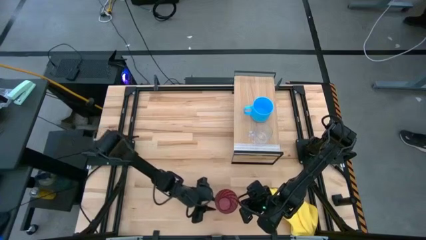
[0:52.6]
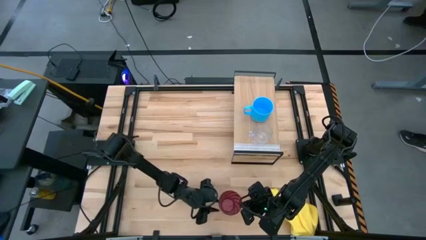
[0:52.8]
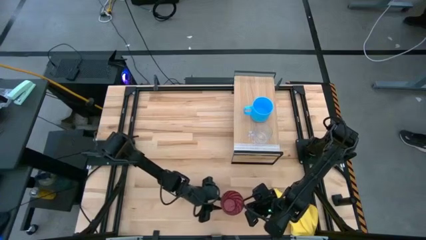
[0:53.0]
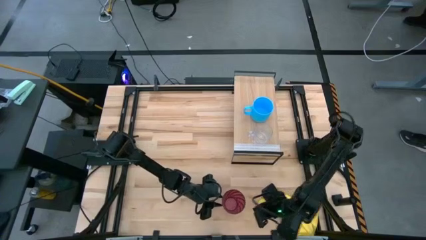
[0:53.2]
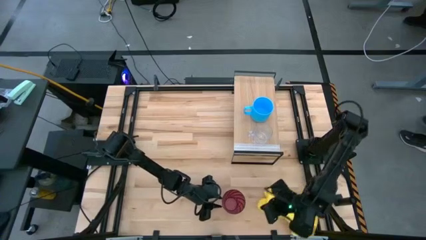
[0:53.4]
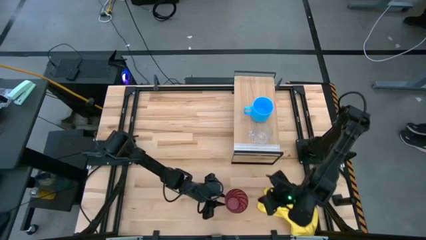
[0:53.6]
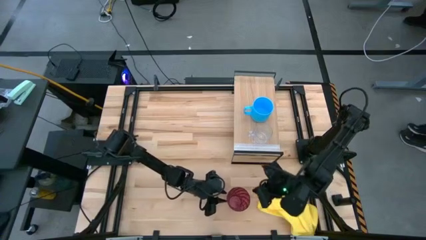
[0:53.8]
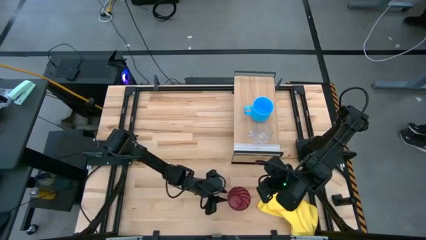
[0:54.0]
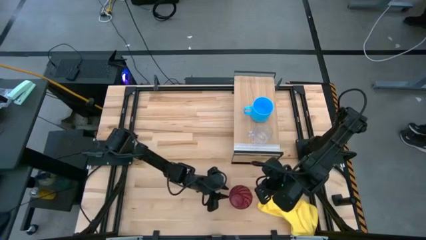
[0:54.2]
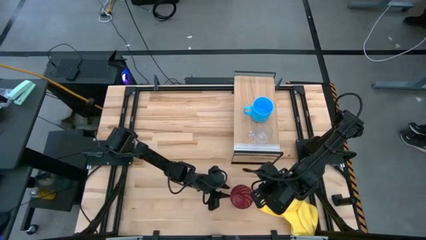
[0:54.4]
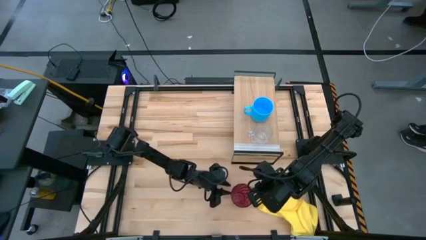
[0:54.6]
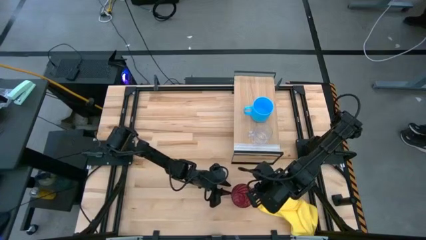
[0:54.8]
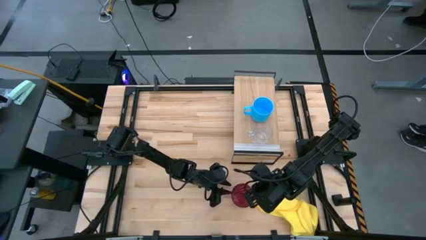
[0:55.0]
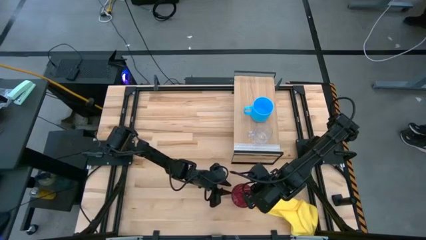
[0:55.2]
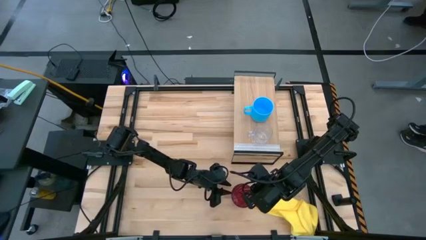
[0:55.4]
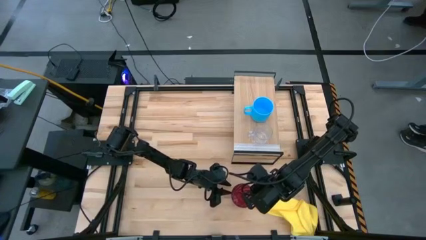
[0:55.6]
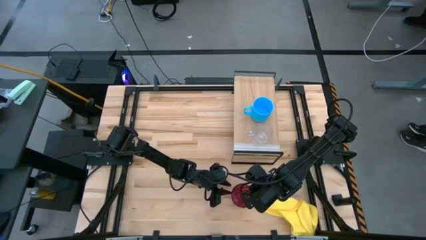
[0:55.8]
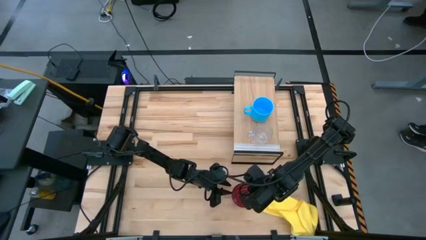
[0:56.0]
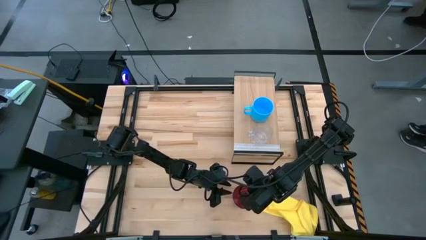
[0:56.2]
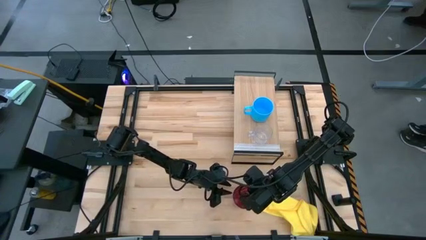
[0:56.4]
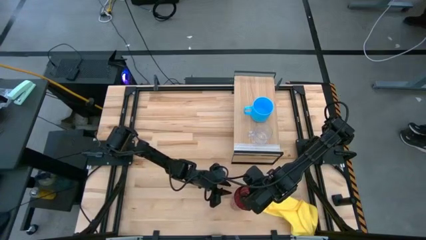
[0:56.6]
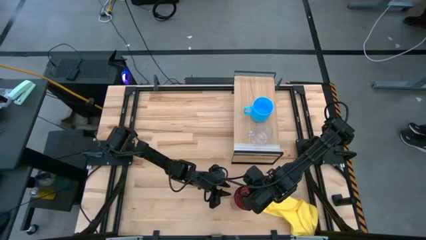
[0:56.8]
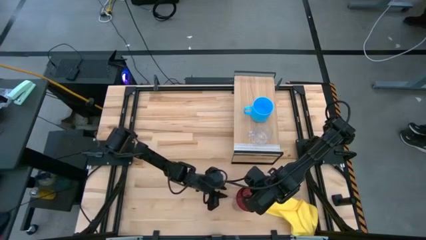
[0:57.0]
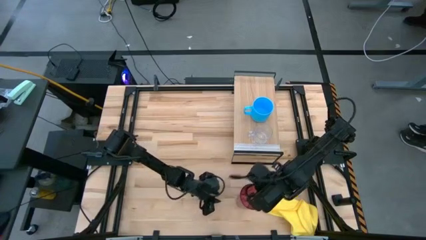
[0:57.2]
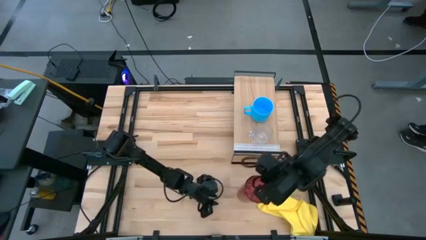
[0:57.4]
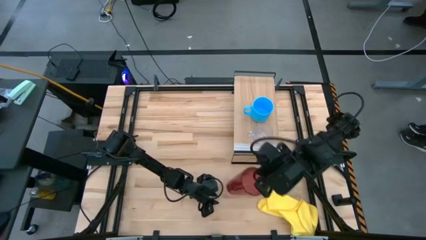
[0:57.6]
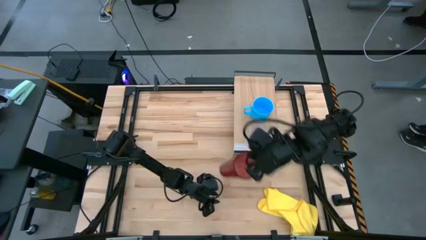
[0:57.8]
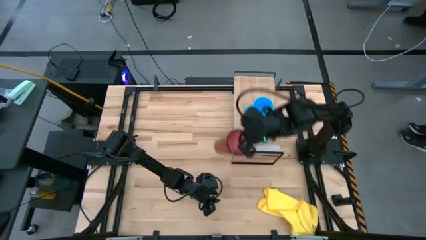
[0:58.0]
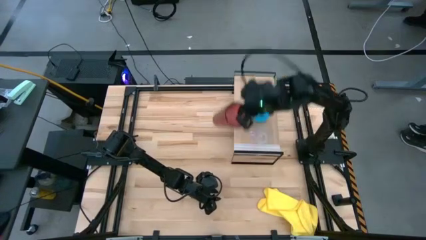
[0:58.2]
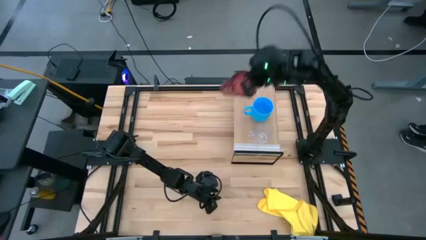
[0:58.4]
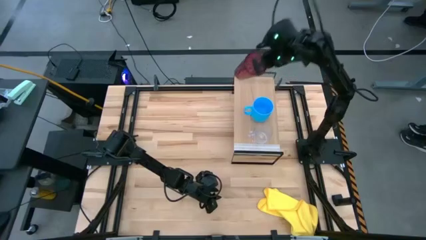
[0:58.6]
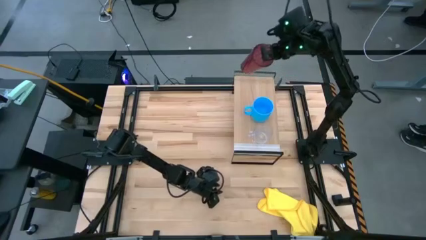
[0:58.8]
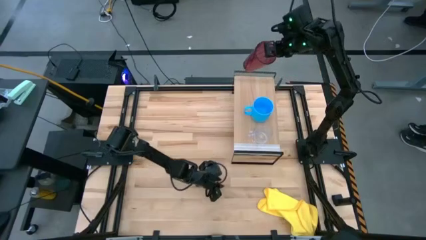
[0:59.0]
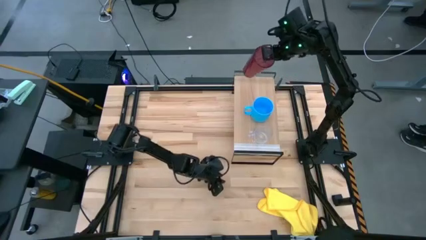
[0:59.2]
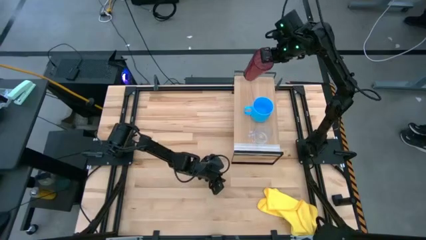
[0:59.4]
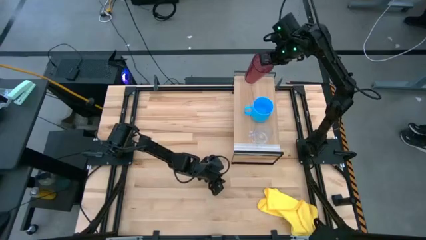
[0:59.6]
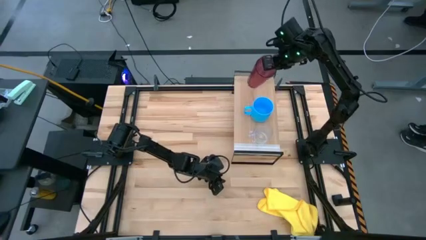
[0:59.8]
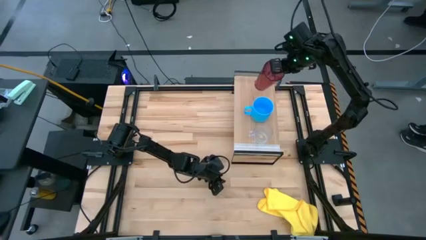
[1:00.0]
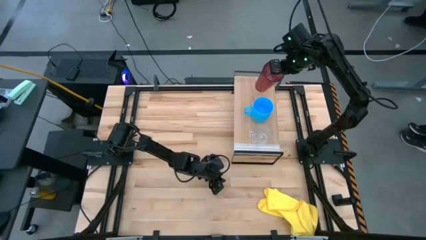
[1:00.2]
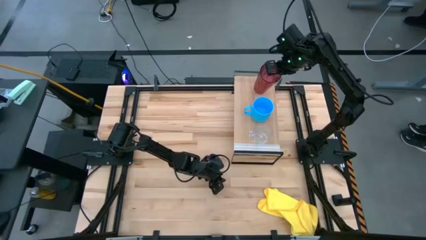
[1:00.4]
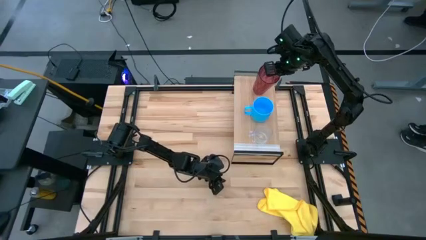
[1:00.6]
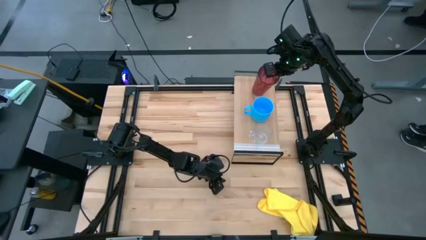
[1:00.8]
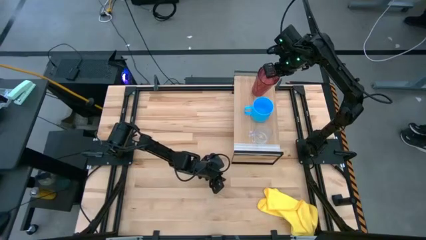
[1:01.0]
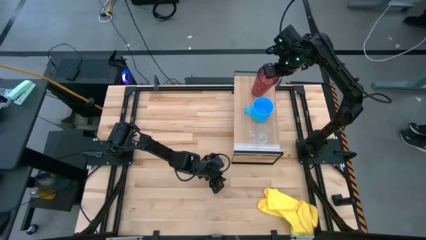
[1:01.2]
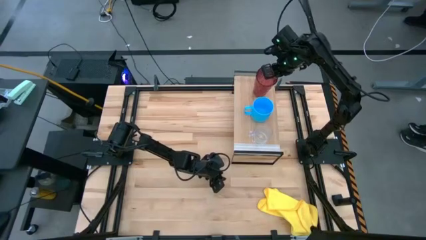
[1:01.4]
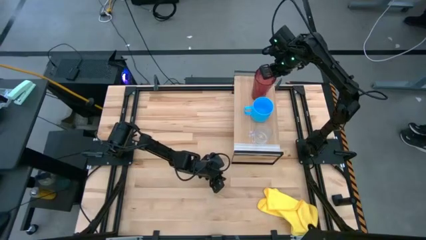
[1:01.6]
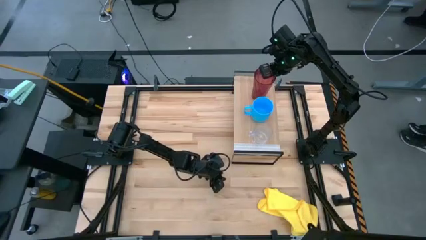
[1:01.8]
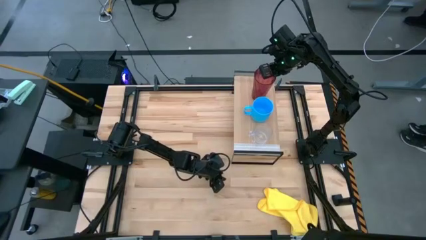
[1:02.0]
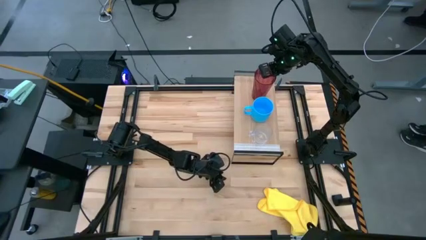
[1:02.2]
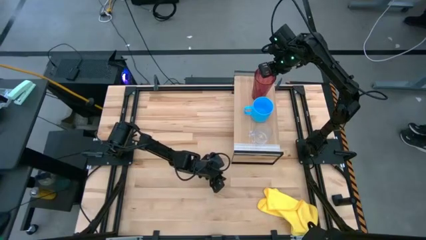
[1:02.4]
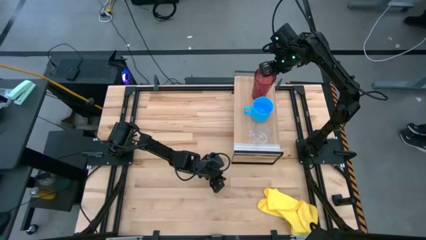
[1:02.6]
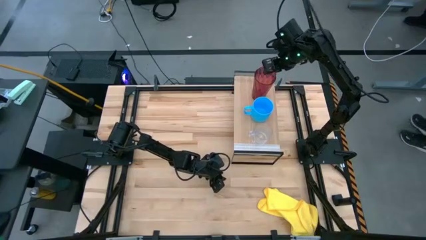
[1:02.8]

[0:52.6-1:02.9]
Task: Stack small to large cups/mugs on shelf
Put the red cup on the shelf
